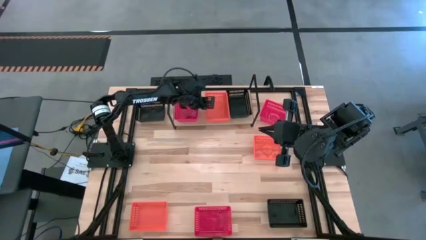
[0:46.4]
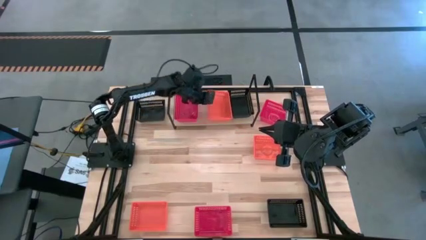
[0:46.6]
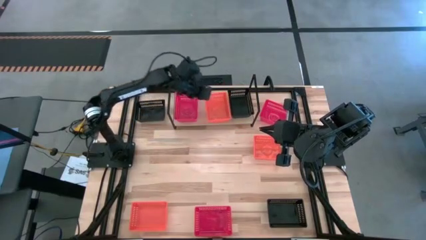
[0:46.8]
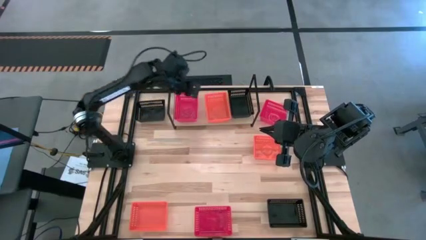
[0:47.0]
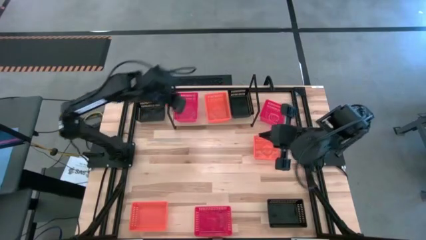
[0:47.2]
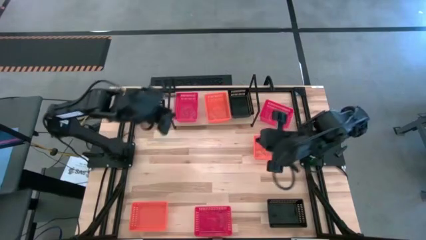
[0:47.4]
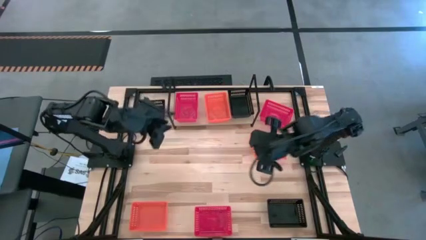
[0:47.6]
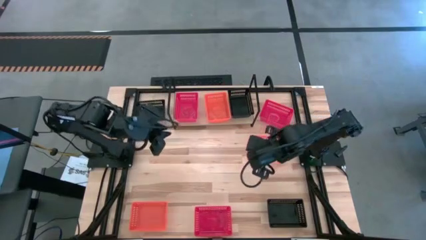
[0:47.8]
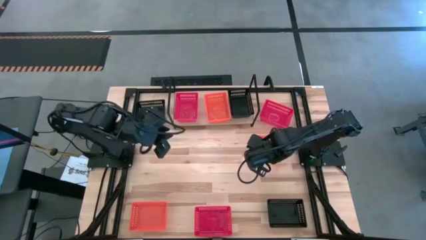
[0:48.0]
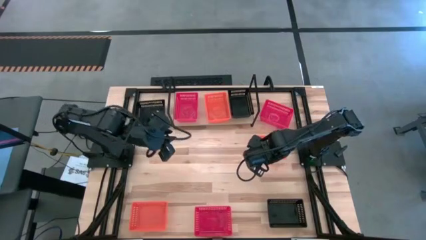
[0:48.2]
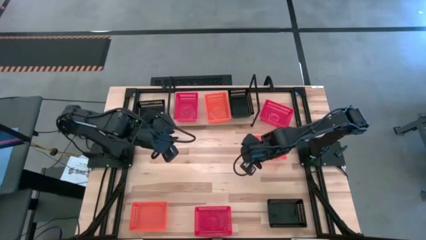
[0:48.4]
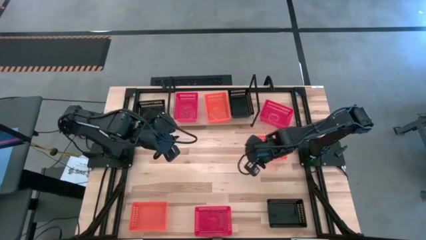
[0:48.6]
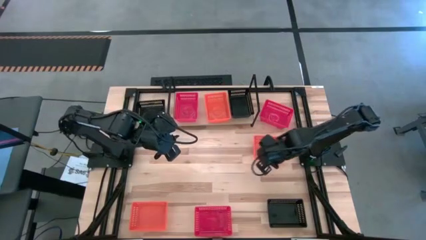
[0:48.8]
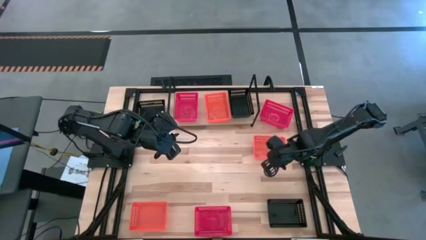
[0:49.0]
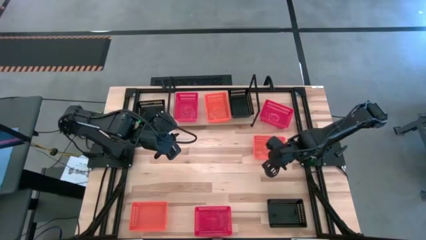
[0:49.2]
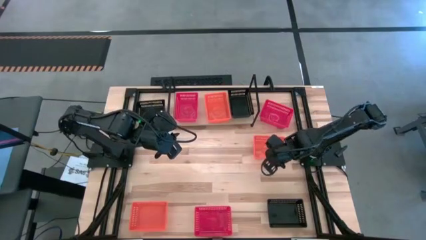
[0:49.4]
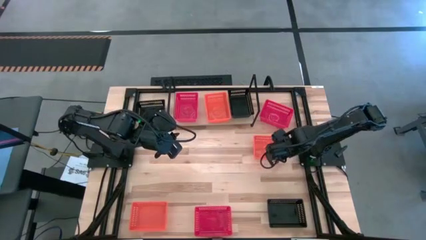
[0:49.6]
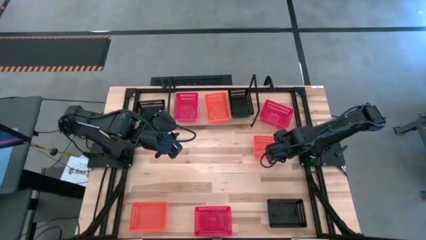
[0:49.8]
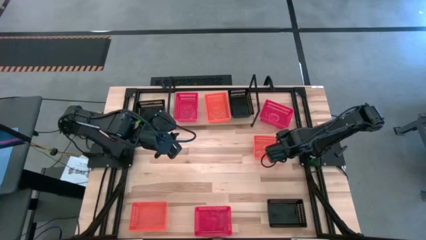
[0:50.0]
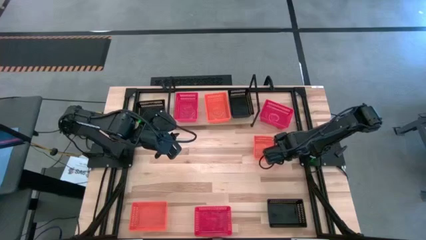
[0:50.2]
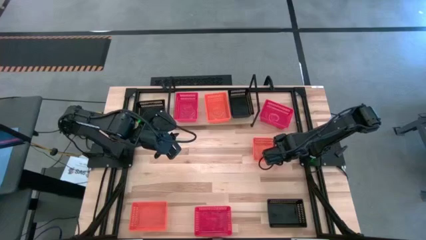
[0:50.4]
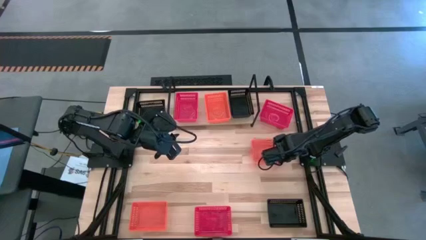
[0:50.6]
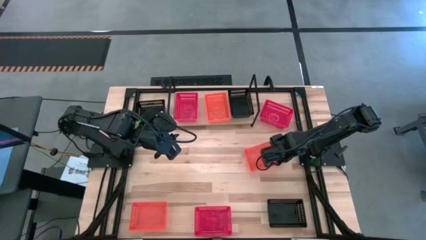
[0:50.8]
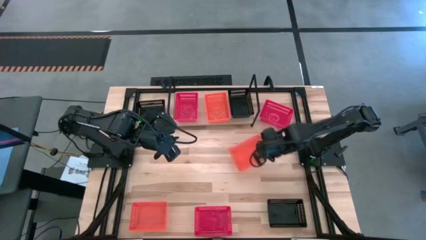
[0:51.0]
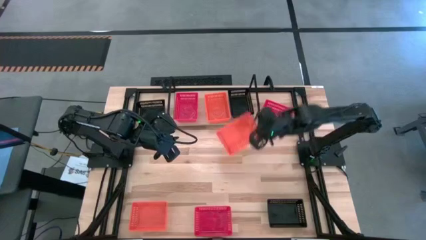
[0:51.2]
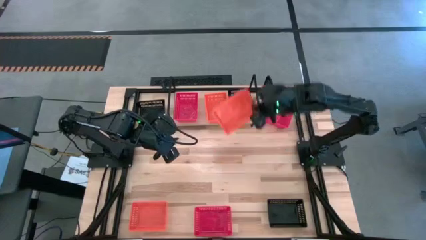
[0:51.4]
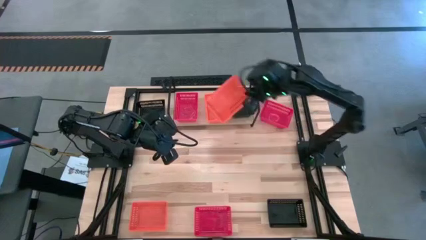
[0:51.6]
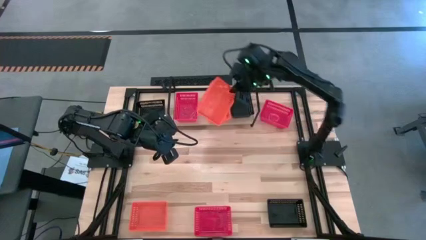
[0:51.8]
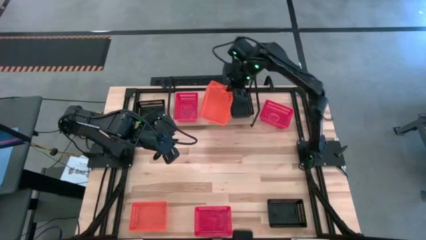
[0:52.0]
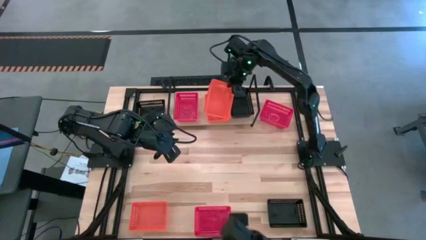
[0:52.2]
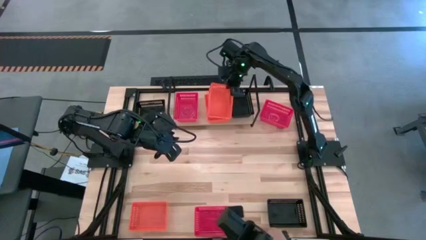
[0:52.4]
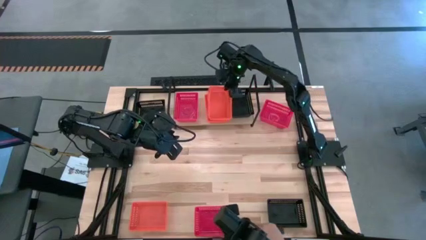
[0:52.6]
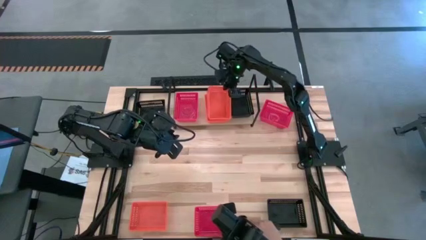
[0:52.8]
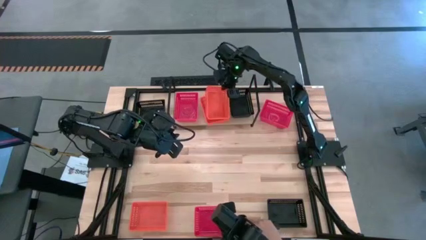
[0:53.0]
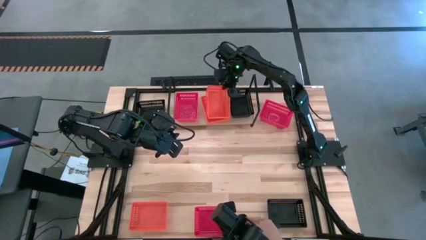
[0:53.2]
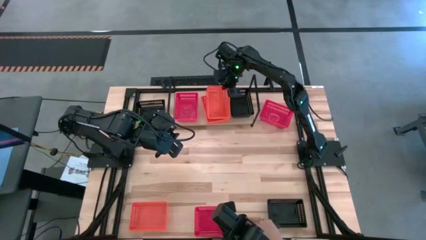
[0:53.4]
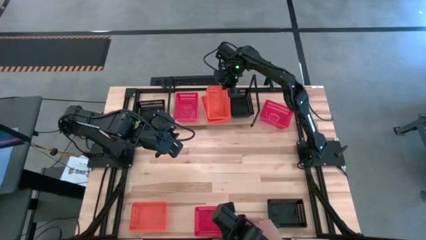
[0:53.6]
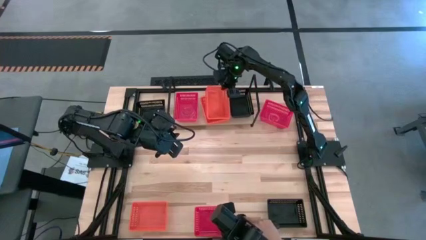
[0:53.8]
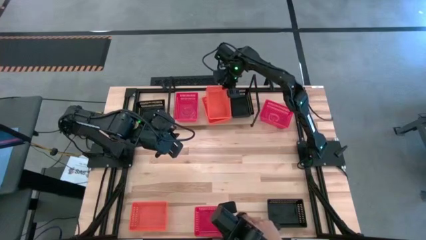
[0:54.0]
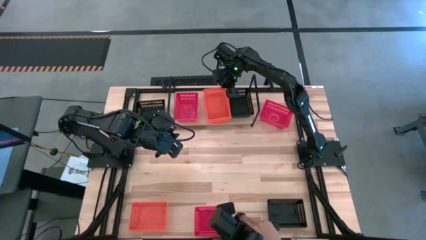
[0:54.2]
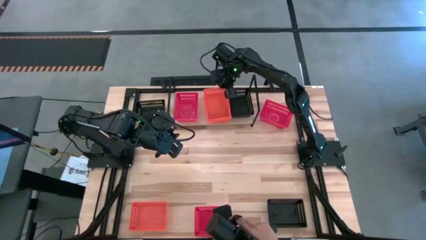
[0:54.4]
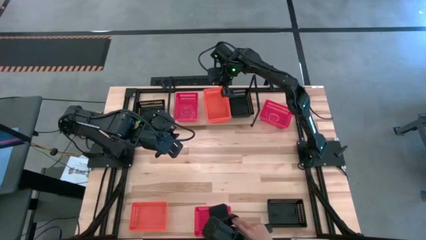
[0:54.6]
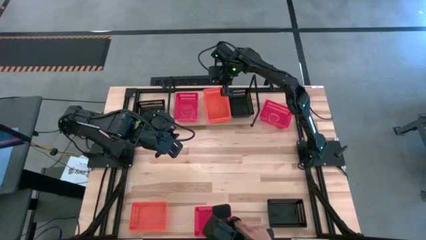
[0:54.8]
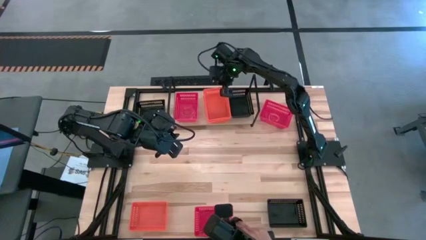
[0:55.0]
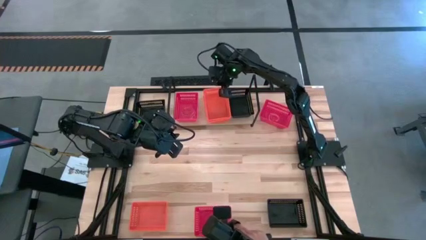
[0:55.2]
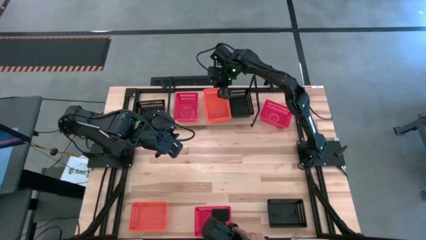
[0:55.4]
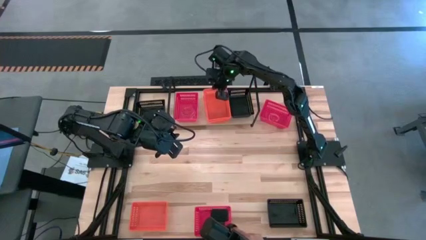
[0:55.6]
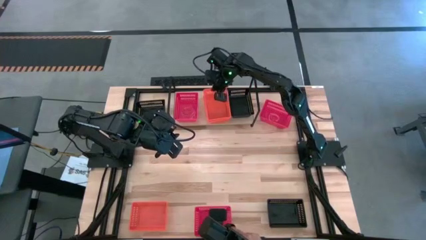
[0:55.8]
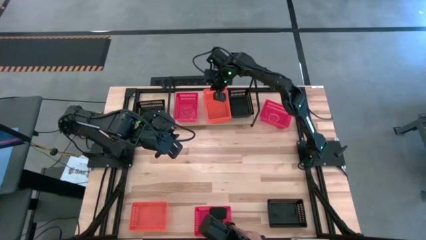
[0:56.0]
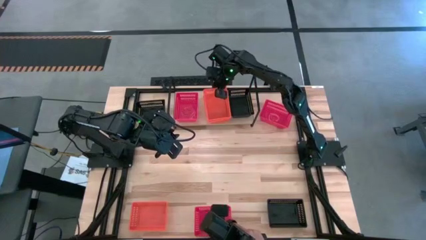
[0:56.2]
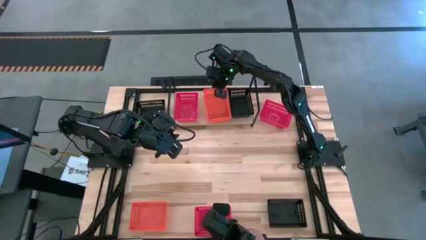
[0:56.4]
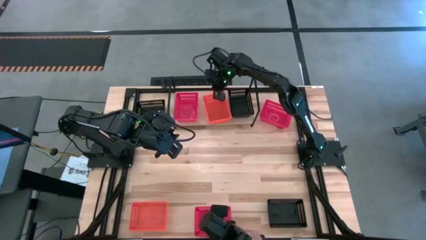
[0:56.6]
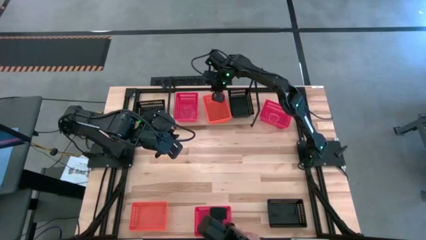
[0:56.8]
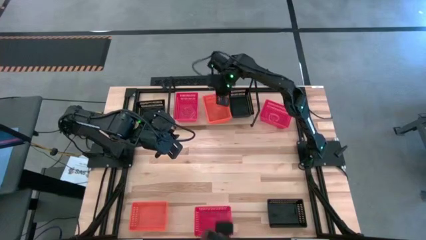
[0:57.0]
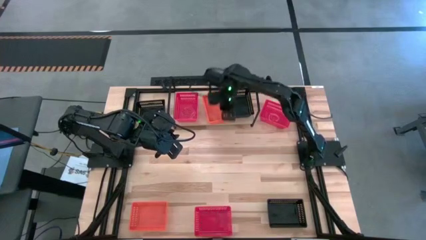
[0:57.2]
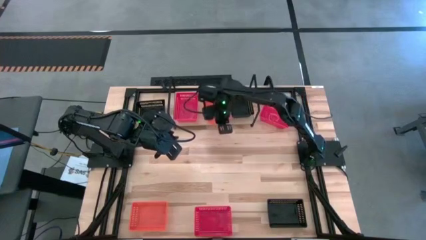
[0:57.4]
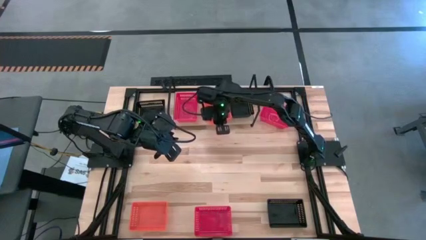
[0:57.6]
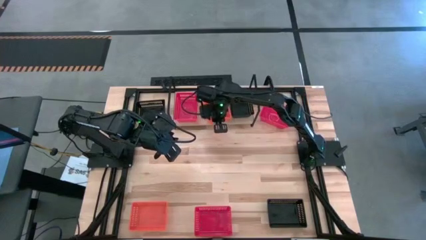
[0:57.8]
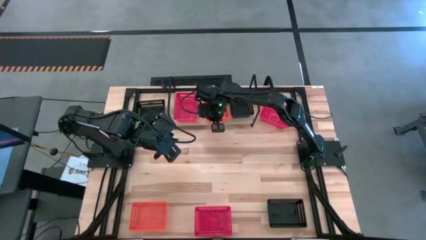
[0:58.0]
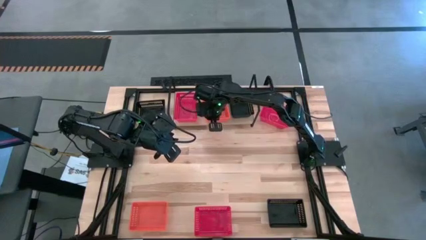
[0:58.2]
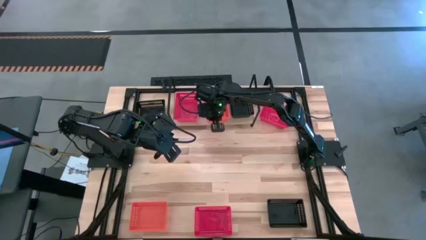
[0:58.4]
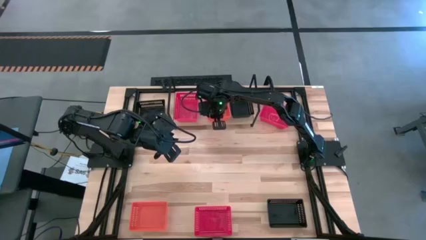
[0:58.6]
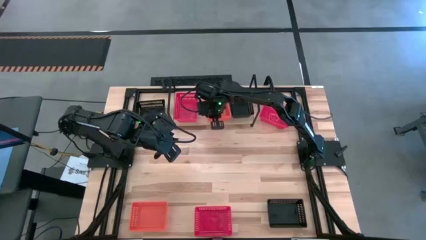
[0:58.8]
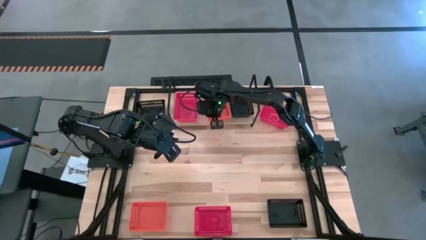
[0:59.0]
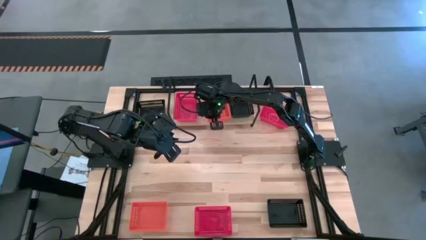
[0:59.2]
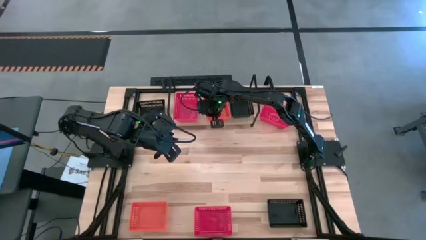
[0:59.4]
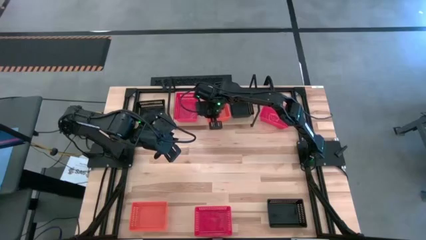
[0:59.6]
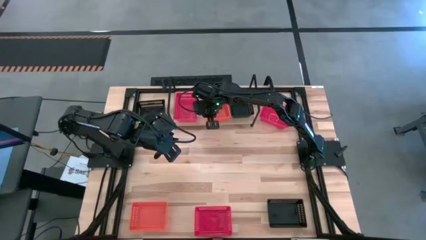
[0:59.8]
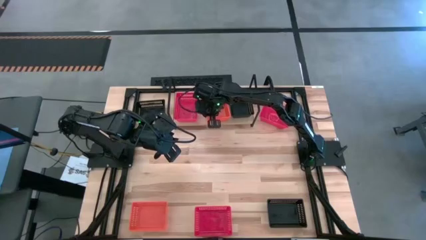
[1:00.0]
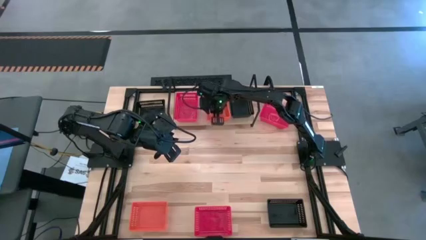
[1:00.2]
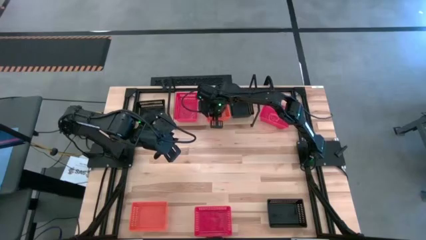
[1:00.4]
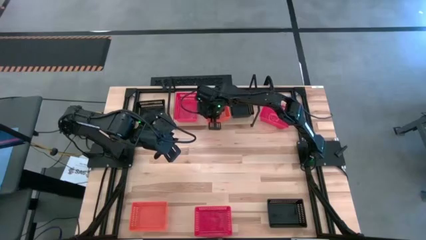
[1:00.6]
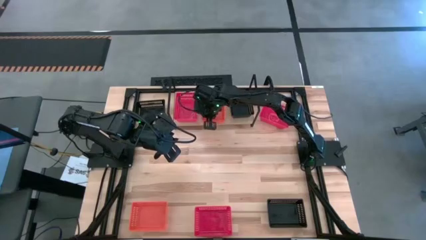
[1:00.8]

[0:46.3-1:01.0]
Task: Stack baskets on shelf by color
Stack the top orange bin on top of the orange bin on the shelf
